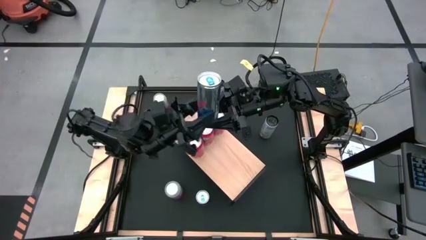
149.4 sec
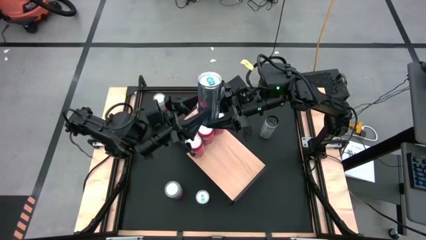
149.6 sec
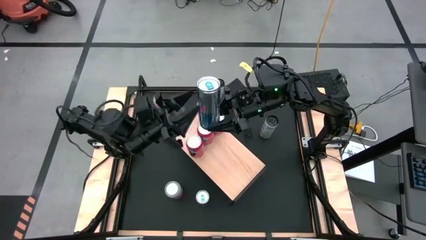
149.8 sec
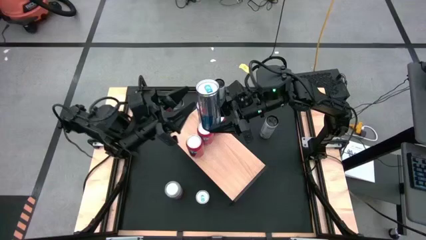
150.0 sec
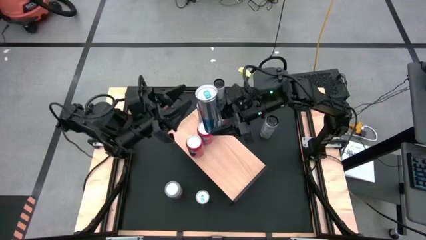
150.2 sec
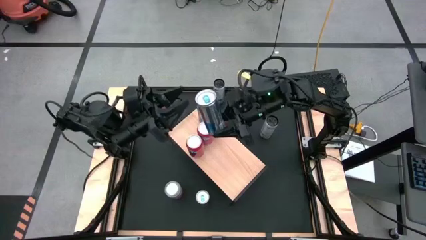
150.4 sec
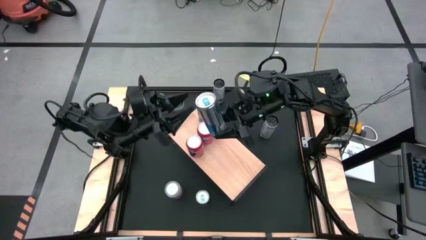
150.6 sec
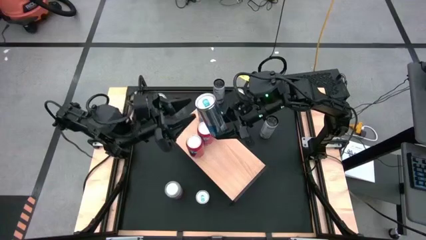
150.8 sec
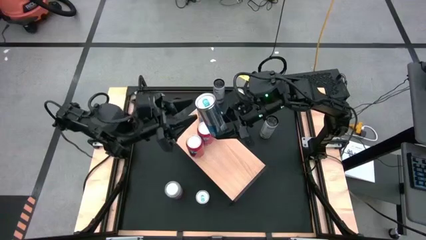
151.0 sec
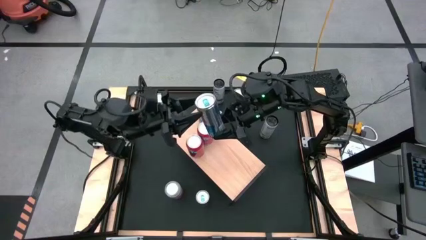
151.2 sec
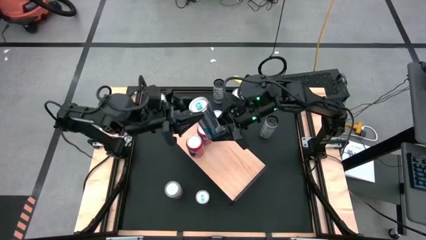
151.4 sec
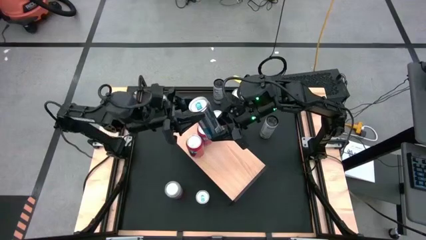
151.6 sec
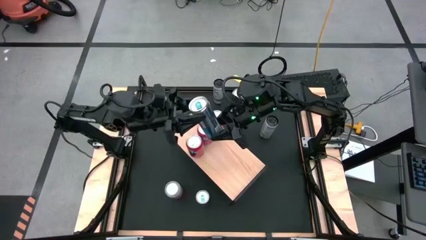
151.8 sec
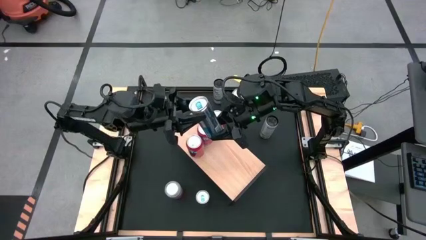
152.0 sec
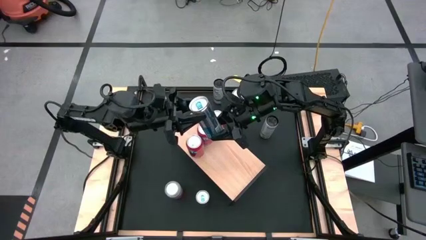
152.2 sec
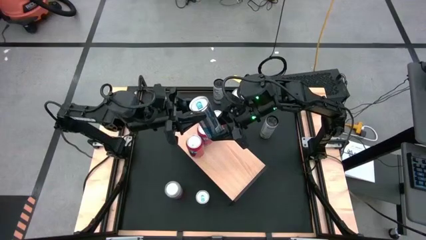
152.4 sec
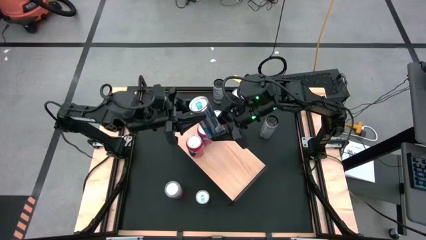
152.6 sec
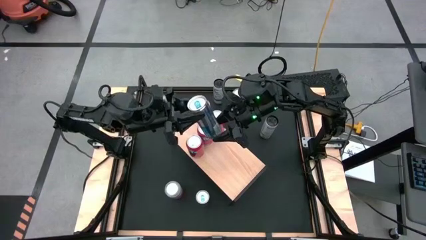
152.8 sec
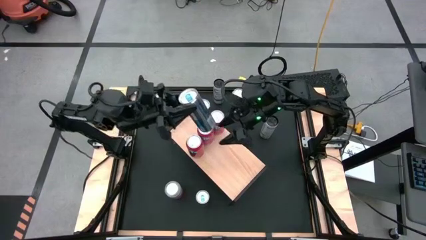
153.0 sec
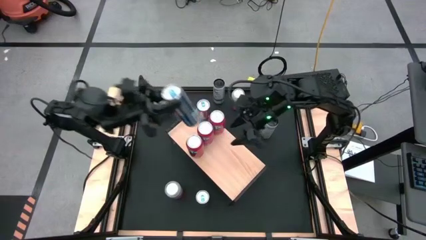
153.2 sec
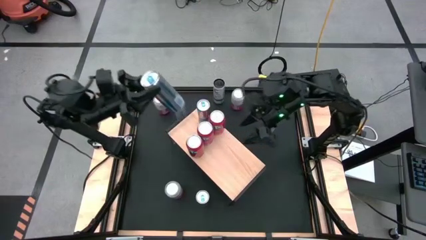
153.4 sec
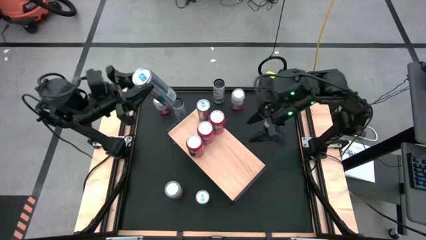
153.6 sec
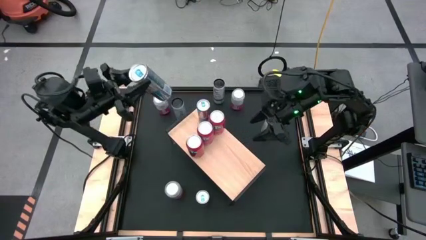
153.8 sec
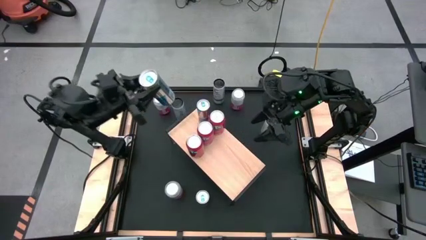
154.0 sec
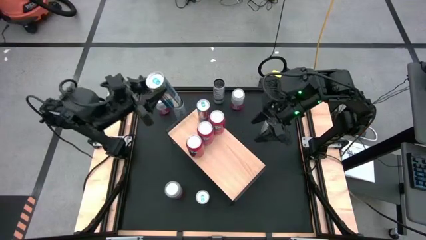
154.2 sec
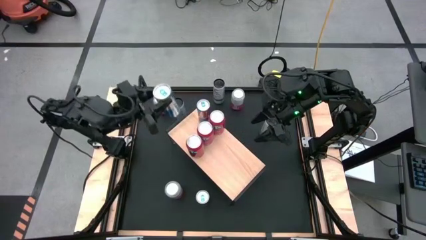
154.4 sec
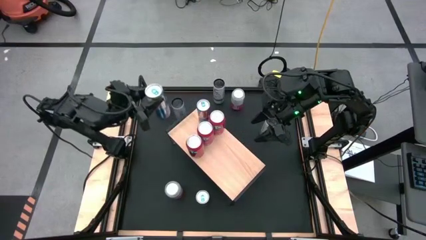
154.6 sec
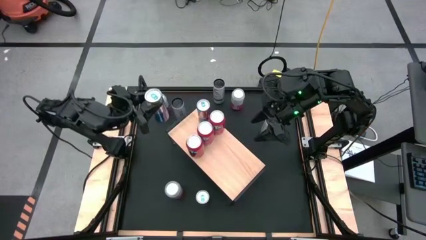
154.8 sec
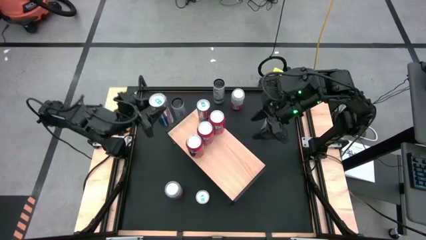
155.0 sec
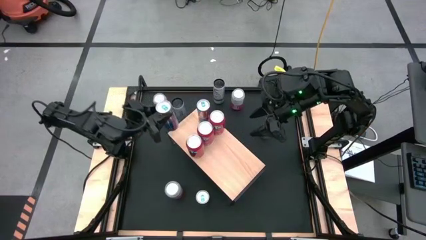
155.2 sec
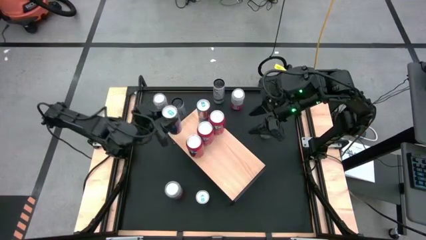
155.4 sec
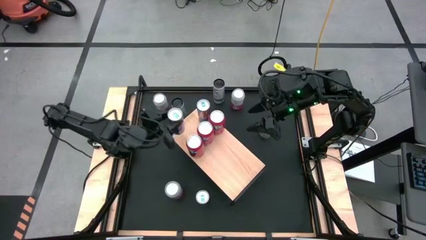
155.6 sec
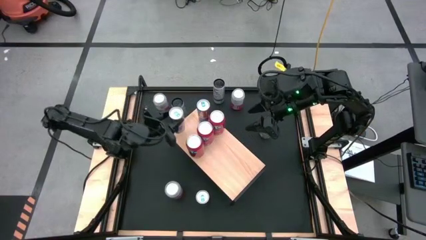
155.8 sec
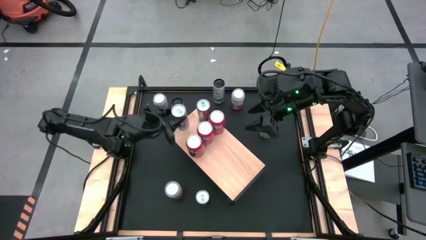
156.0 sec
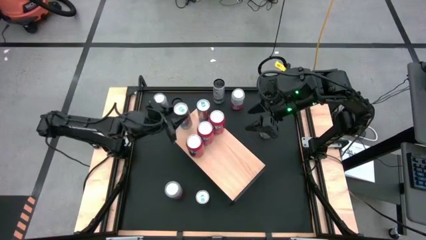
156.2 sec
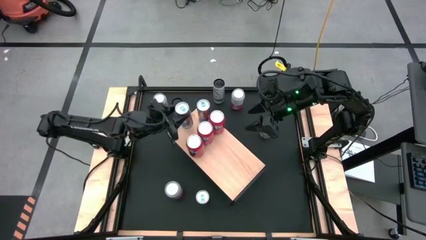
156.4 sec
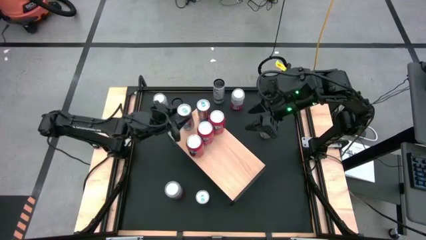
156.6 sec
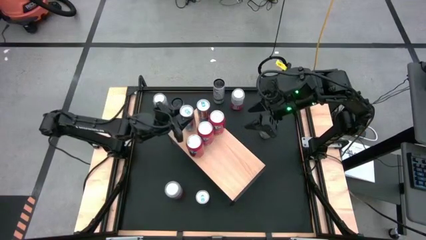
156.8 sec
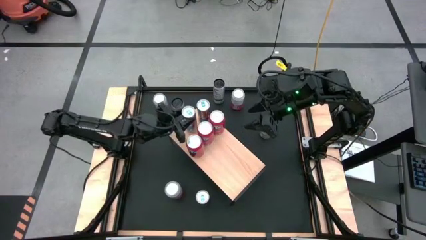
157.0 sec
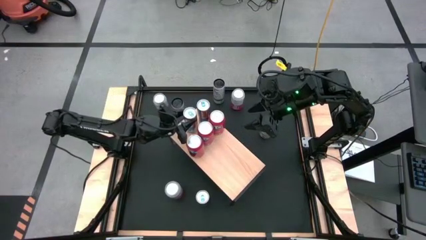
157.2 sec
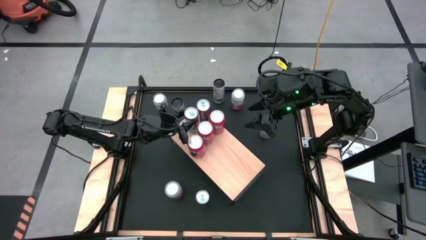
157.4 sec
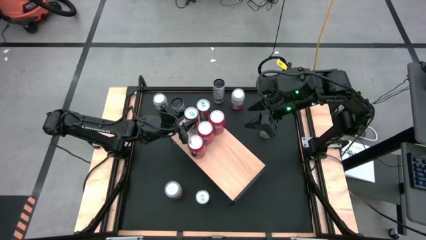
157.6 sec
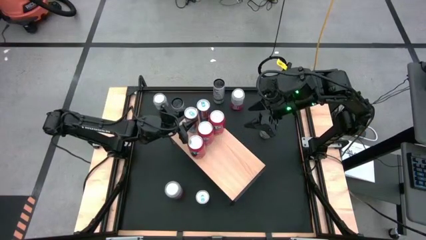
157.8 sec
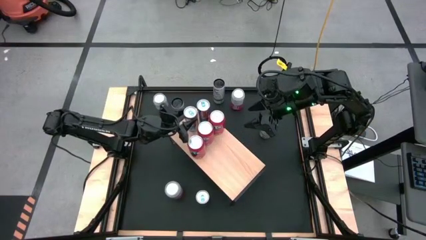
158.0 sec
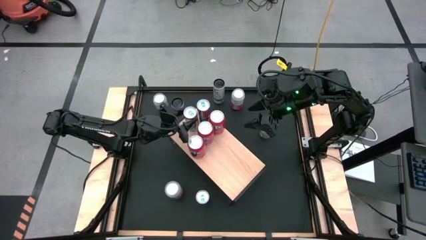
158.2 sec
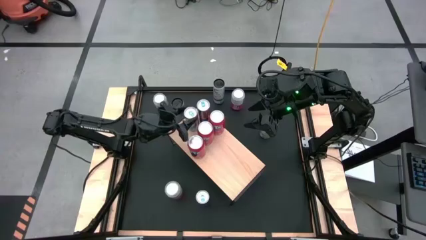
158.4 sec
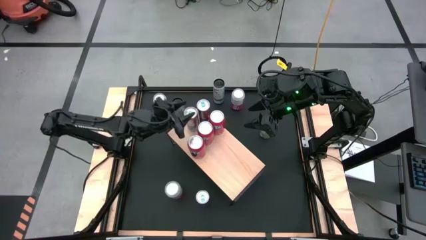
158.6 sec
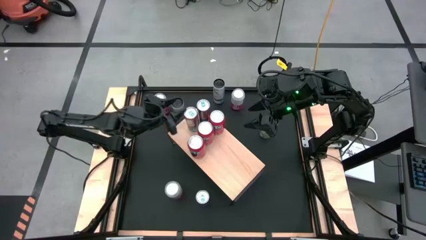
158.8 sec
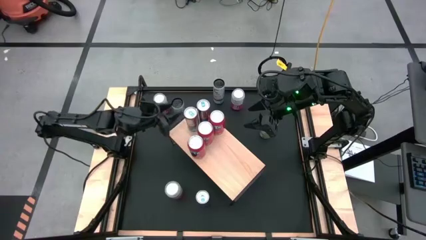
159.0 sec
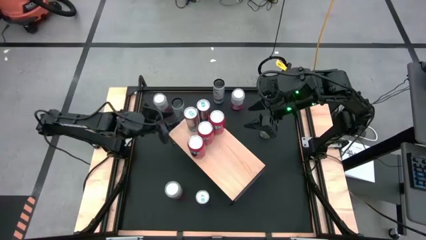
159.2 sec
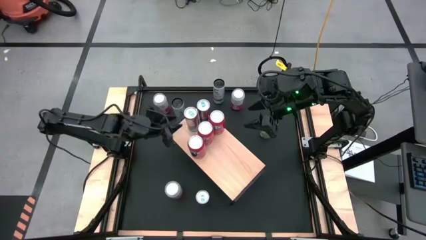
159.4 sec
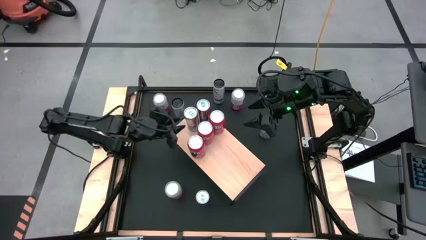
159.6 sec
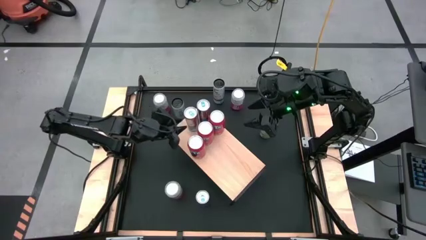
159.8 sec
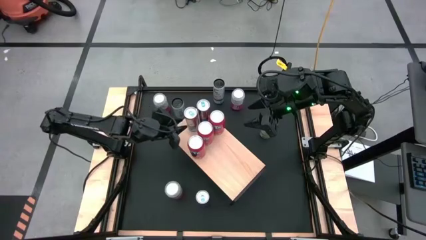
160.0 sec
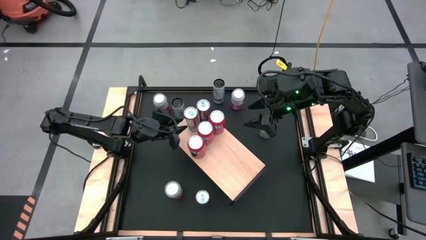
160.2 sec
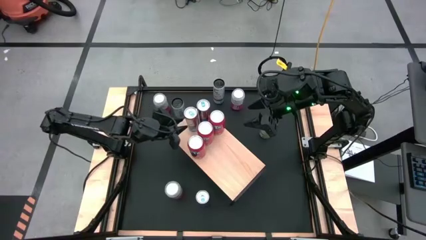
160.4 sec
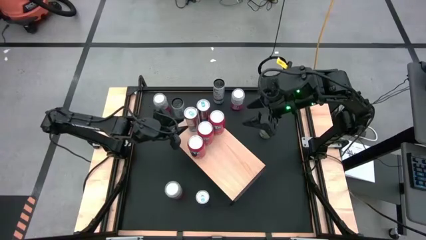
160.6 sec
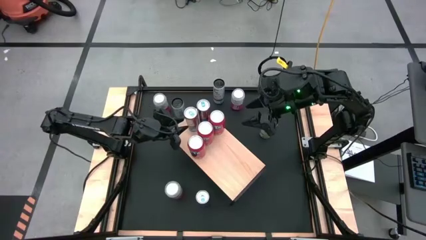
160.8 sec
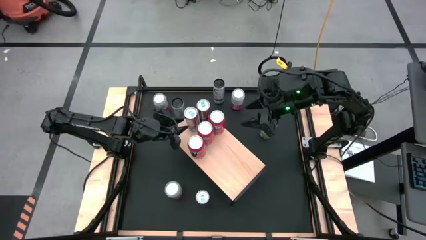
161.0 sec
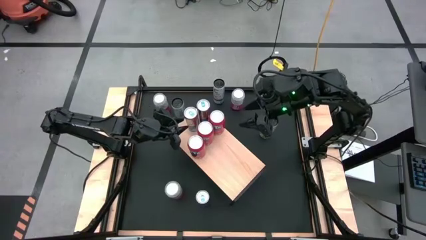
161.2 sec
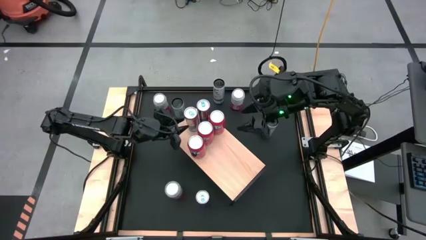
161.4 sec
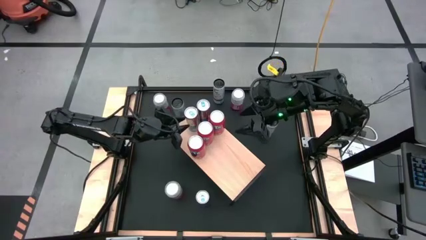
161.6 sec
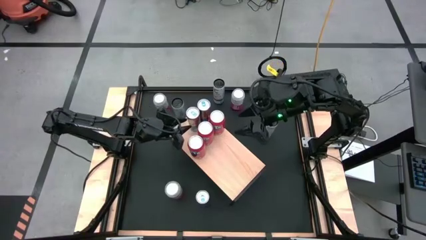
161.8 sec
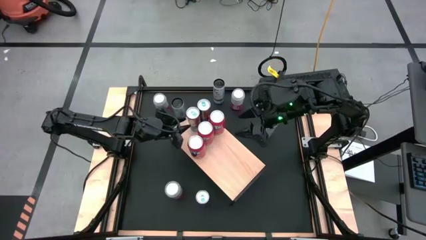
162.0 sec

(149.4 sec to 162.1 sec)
Task: Place canned beverage on shelf
Put the bottom blue soda can on the shelf aligned with the other blue soda can

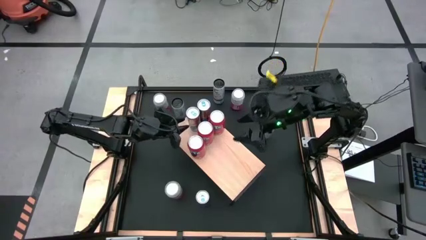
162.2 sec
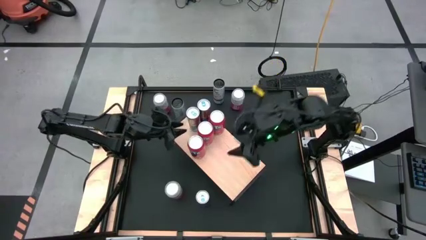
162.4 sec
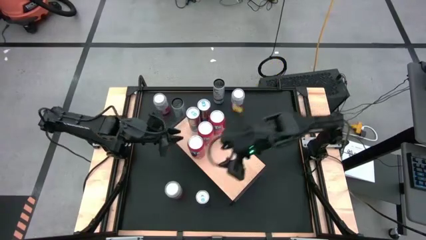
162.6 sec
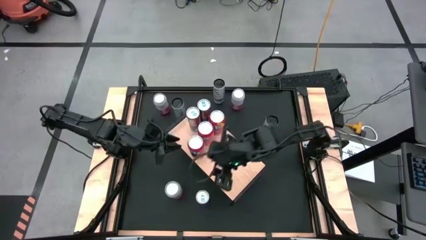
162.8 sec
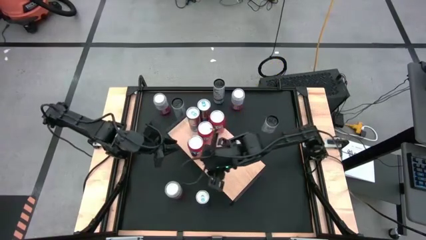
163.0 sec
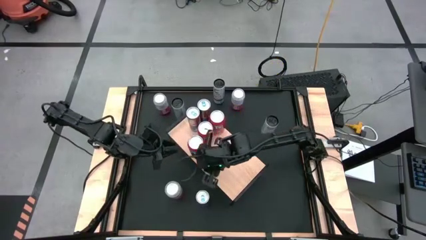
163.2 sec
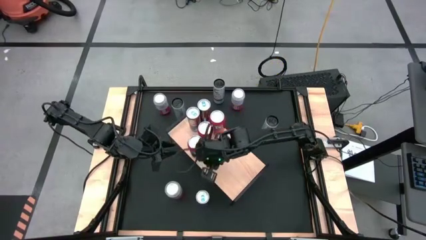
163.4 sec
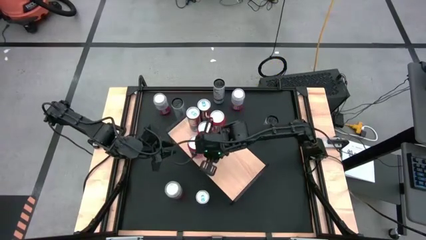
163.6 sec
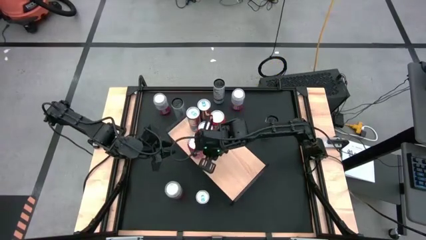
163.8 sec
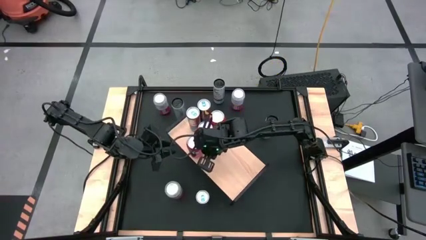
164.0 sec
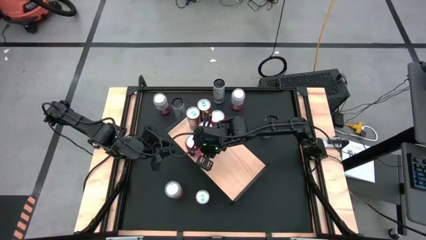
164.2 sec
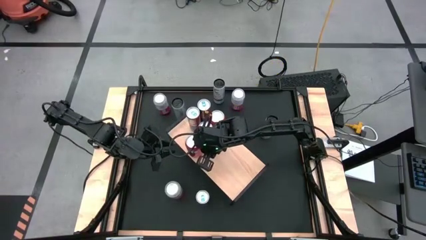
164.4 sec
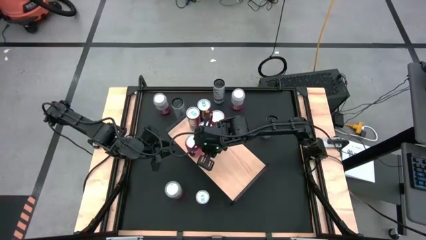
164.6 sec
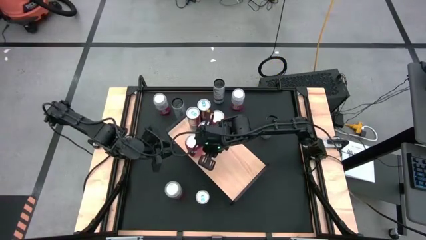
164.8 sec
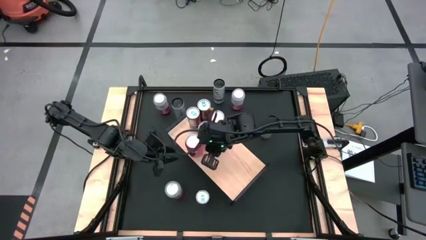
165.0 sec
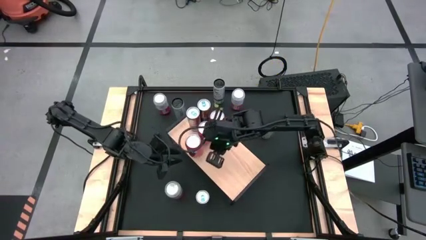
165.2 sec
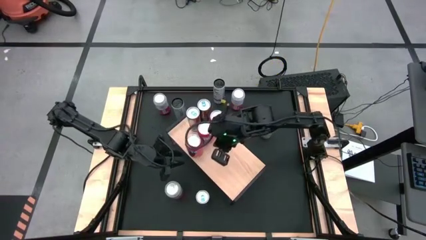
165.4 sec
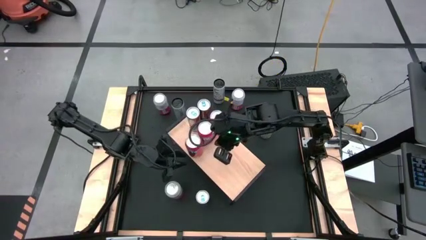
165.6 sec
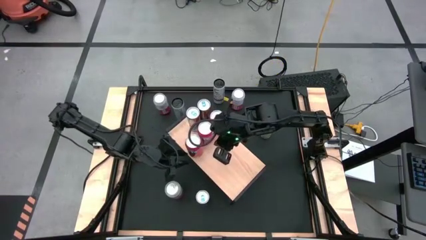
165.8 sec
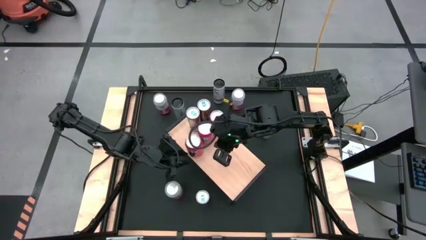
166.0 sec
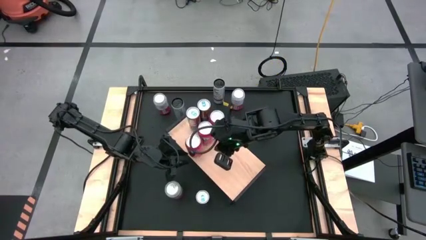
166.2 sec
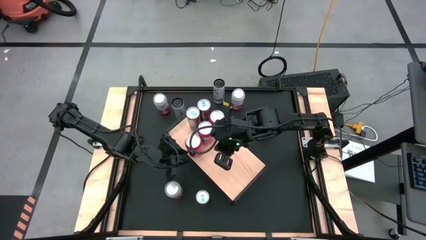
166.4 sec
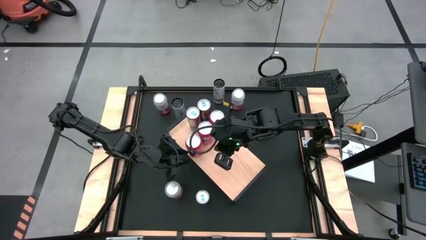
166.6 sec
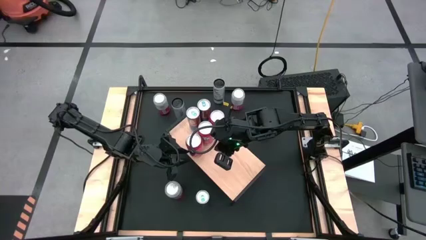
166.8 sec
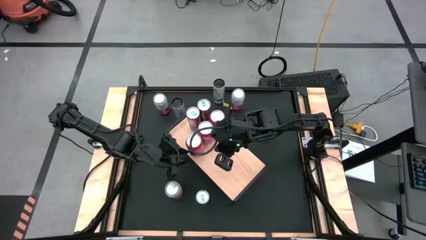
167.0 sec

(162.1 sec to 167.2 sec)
Adjust the red soda cans on the shelf
